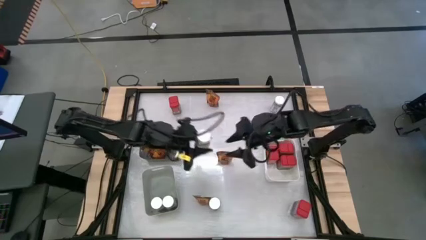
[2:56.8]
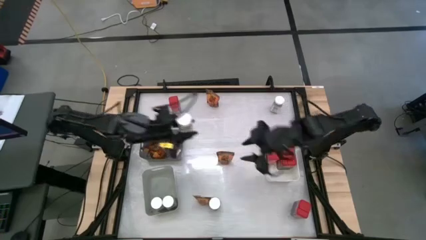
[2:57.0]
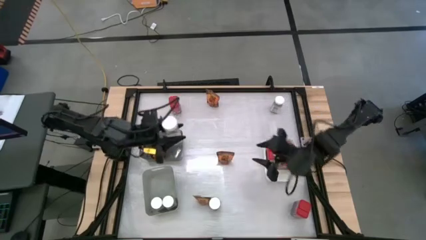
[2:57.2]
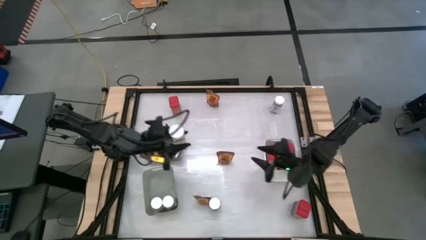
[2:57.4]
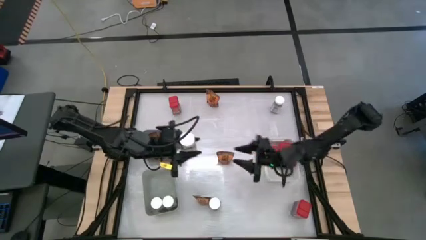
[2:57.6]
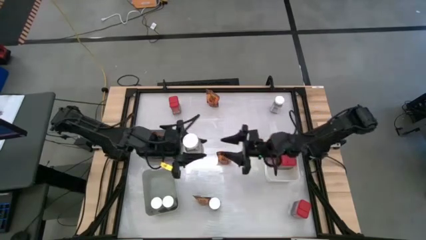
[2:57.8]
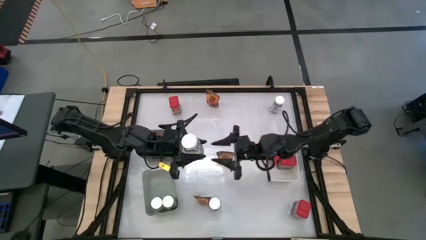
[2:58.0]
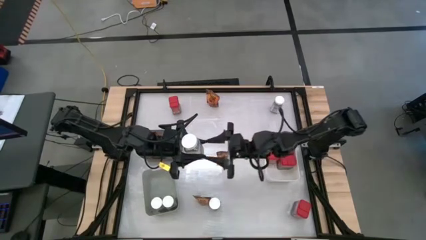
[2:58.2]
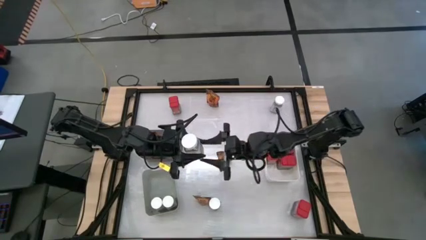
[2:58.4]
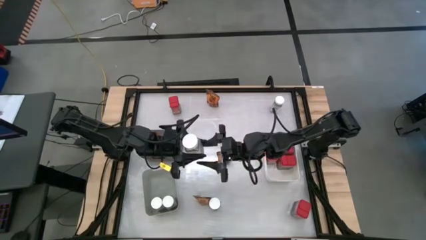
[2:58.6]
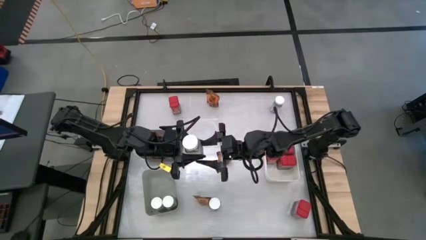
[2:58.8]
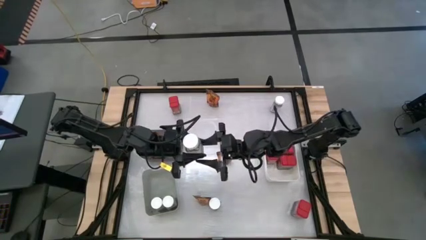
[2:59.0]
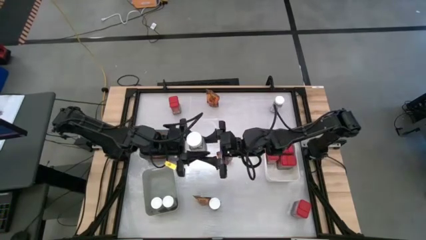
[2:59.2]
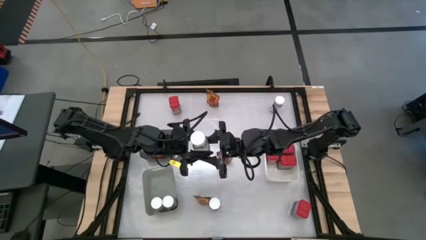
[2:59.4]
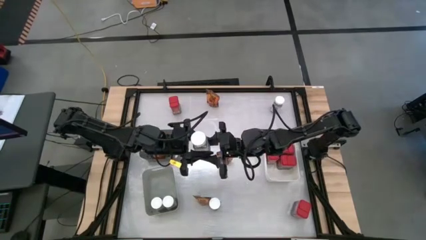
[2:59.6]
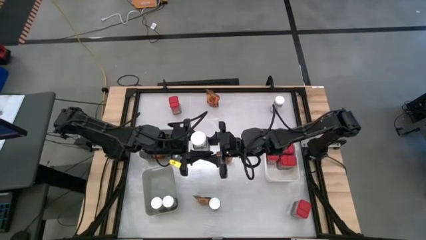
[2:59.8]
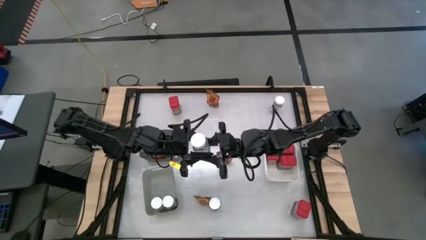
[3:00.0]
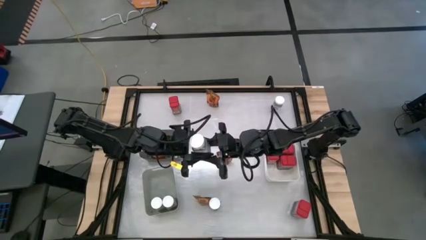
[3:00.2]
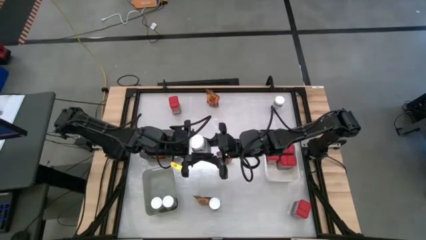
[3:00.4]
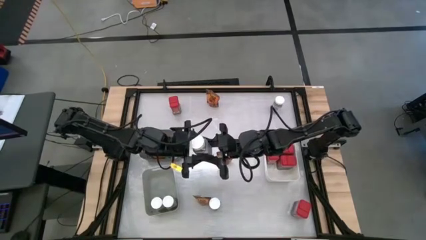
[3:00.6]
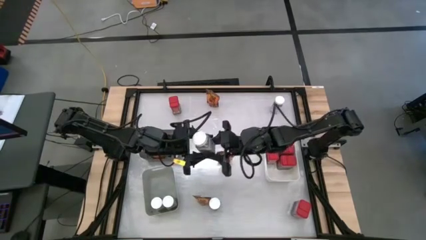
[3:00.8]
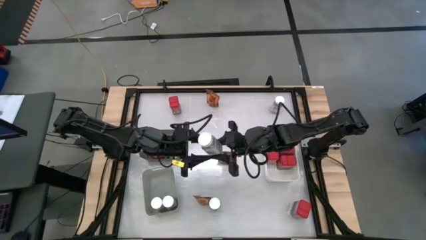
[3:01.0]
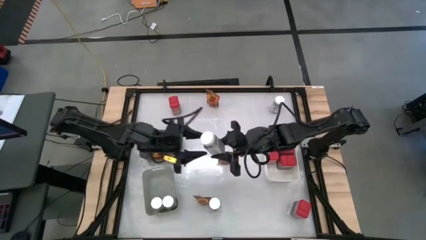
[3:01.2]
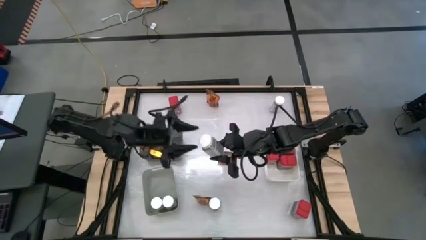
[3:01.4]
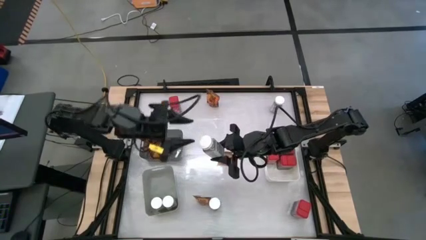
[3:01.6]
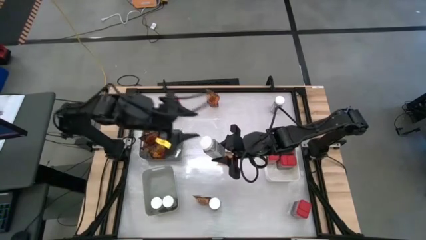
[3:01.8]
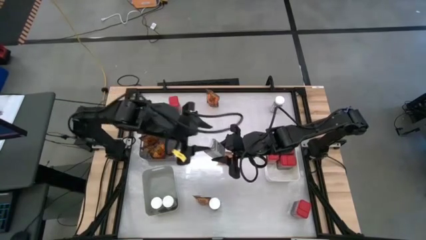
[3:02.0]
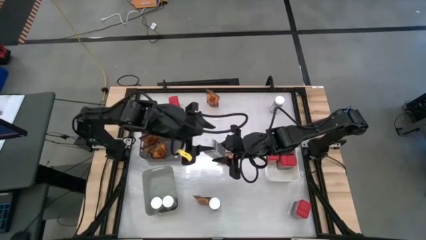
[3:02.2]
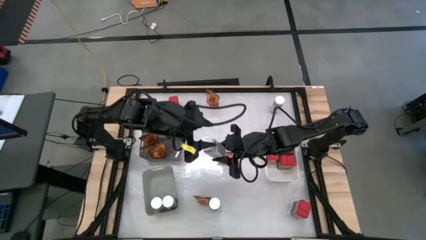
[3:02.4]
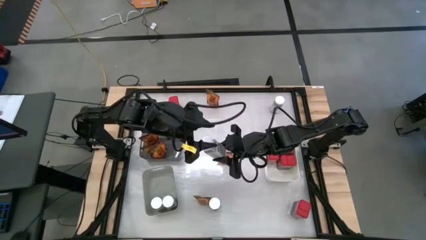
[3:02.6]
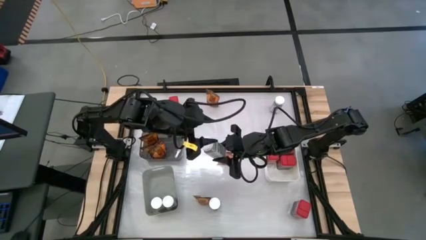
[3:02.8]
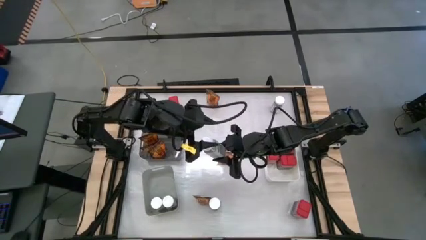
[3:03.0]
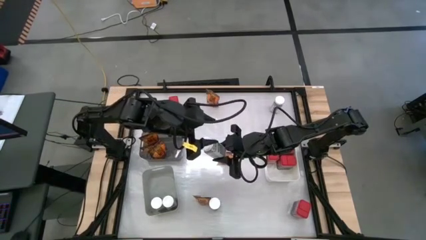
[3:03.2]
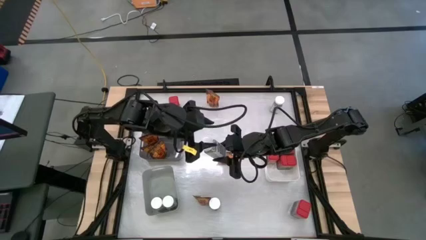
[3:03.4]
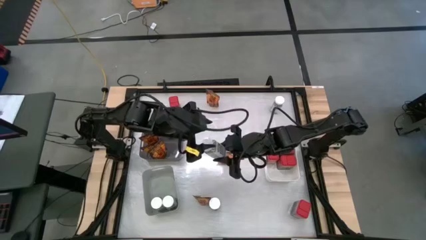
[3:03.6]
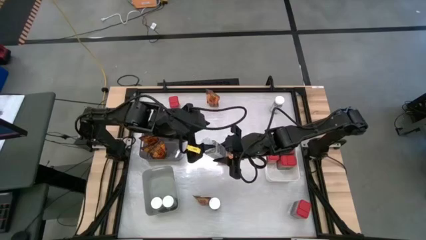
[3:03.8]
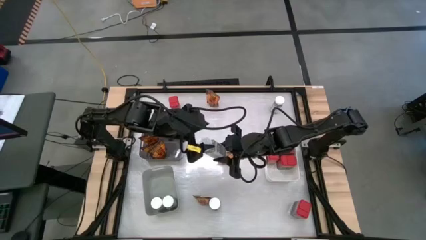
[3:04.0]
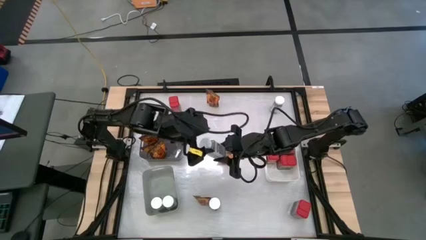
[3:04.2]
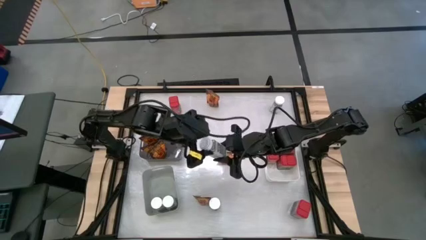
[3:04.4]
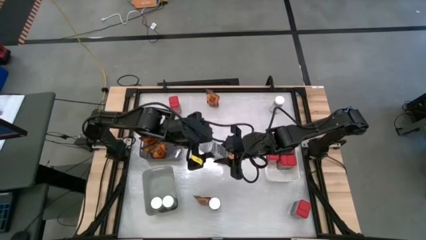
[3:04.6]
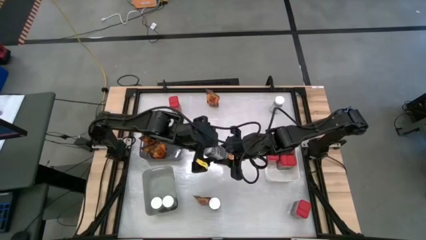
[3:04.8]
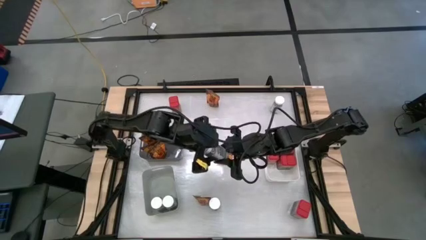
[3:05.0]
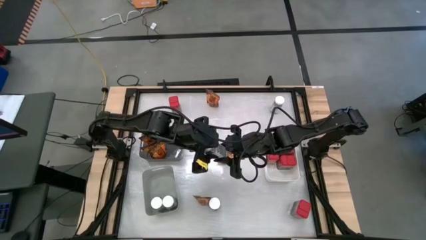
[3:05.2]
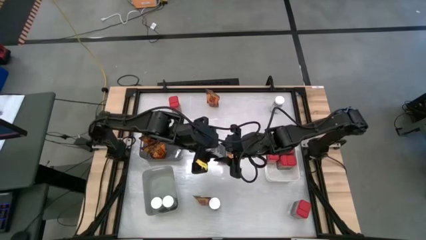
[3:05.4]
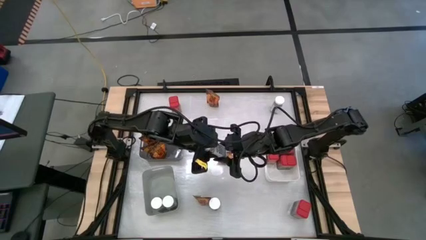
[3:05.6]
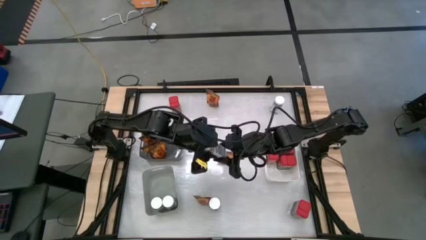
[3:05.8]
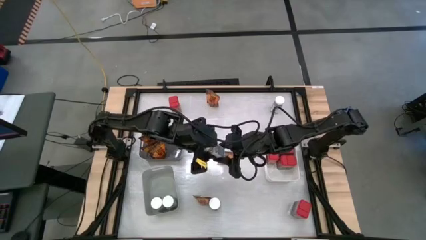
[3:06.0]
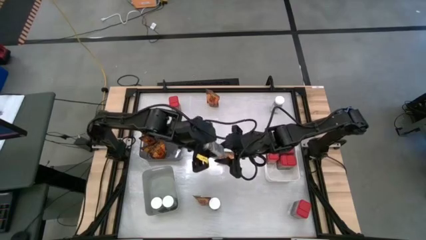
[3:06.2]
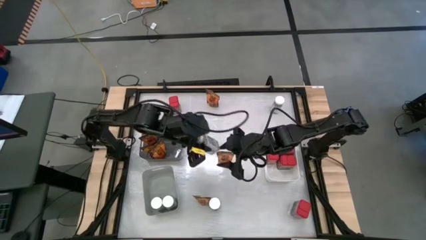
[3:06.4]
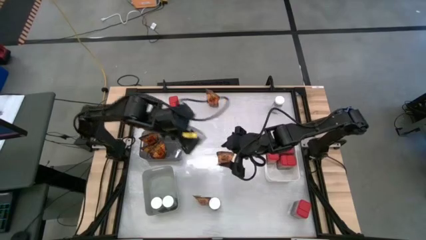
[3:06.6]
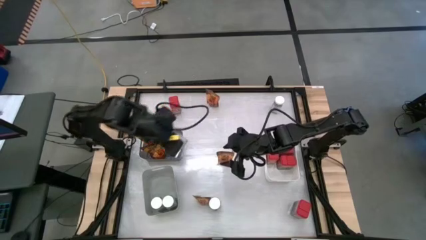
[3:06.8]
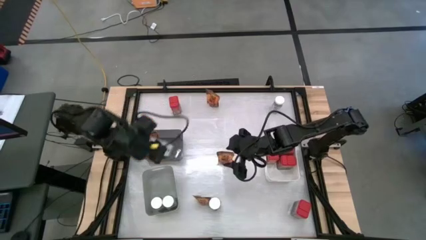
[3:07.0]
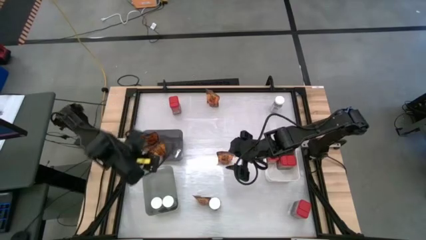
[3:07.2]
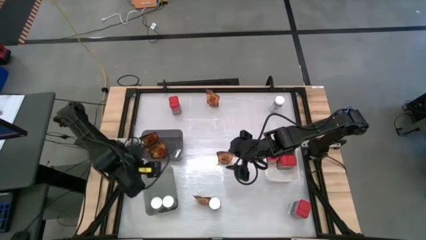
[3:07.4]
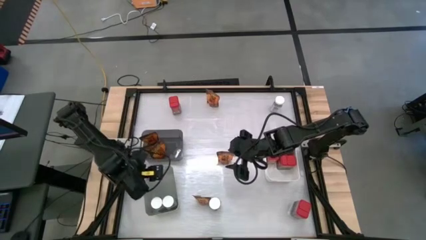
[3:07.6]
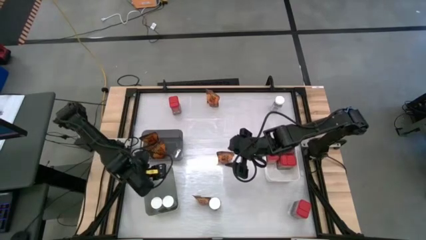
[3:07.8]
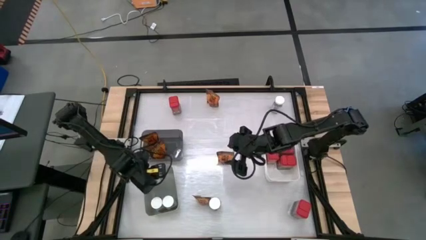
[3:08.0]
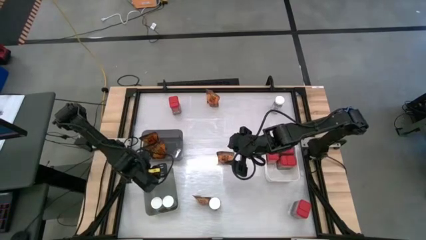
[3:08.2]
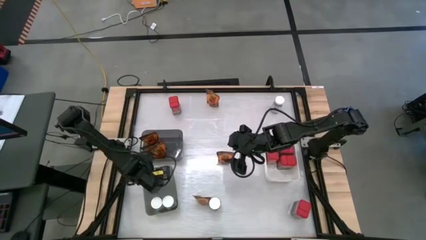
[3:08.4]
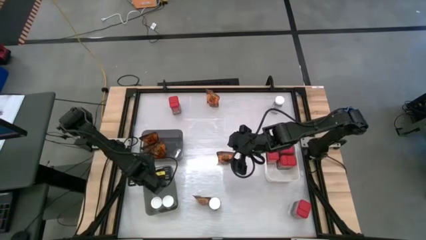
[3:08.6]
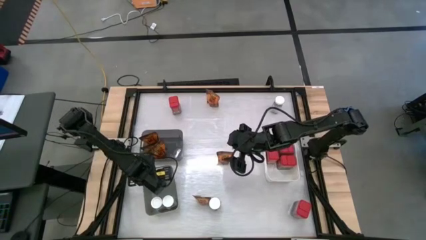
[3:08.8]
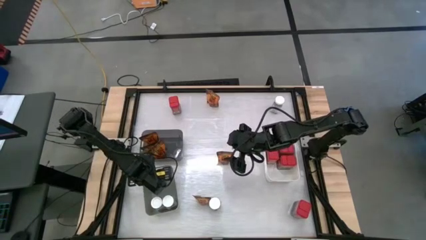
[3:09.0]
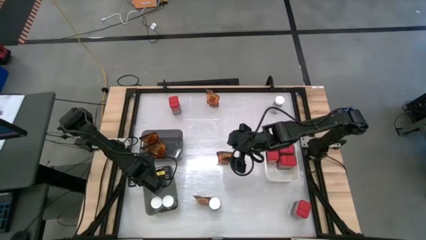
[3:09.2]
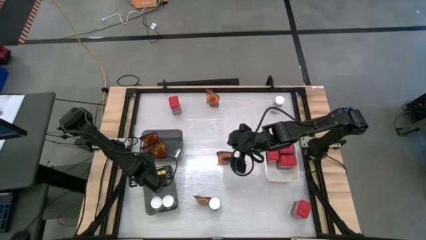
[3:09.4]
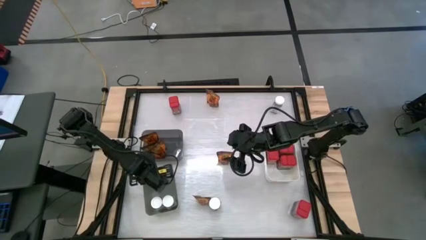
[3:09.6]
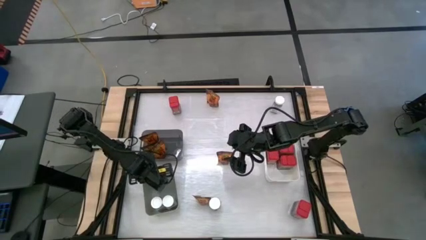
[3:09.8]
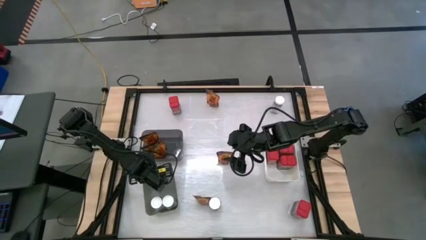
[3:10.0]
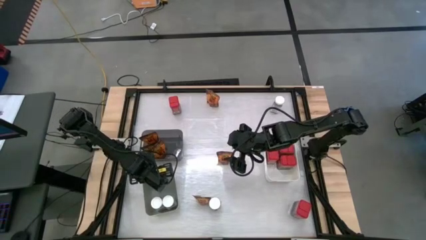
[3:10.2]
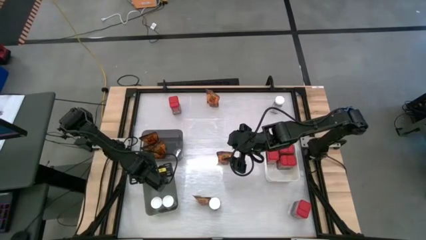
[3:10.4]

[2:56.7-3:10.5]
Task: Sort spices by type
Adjust the white spice bottle inside the gray bin
